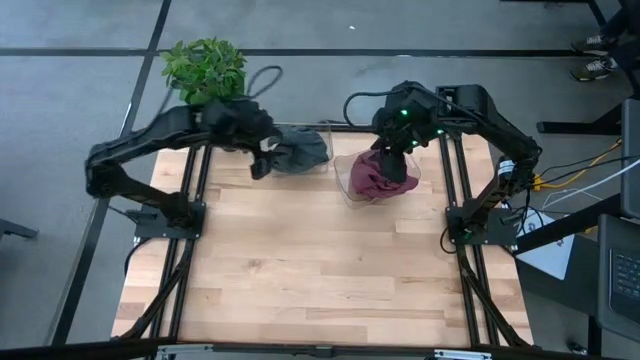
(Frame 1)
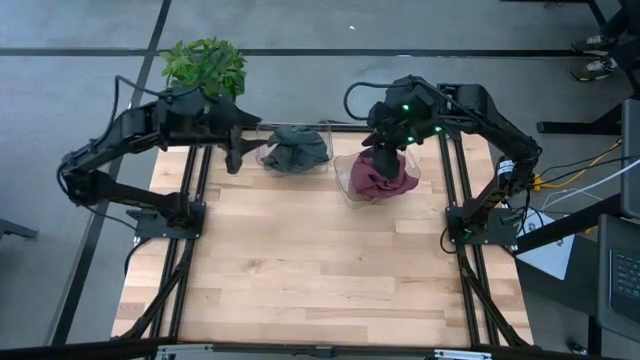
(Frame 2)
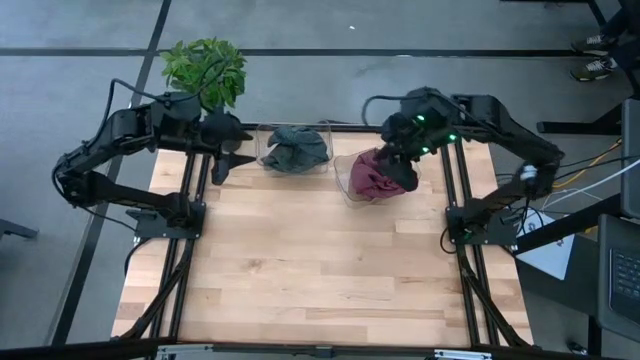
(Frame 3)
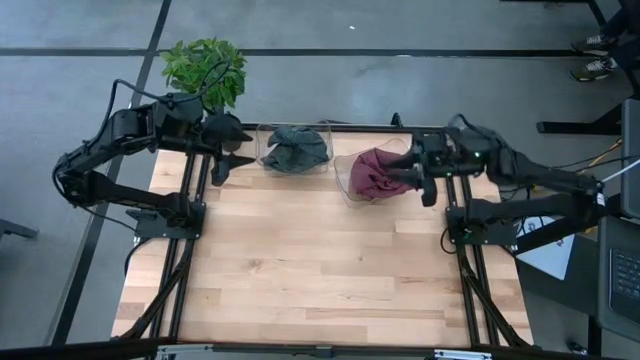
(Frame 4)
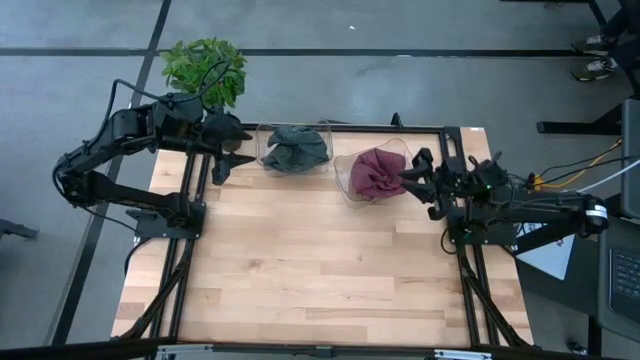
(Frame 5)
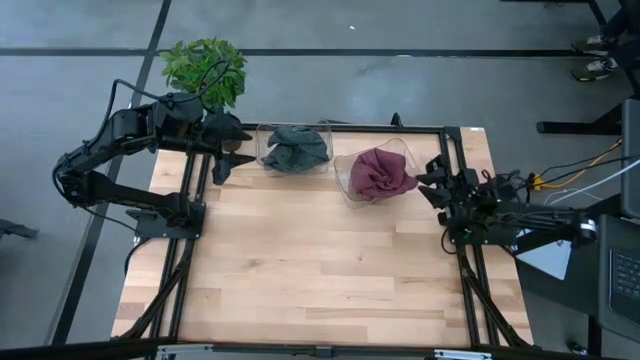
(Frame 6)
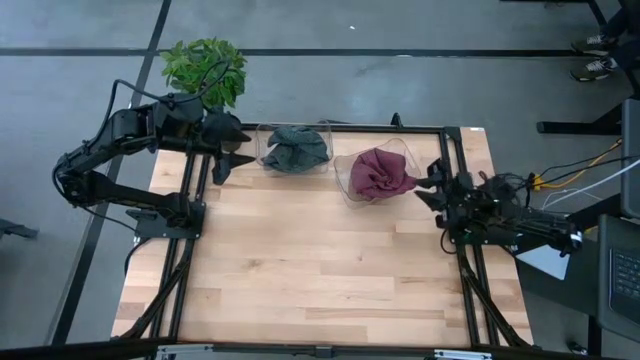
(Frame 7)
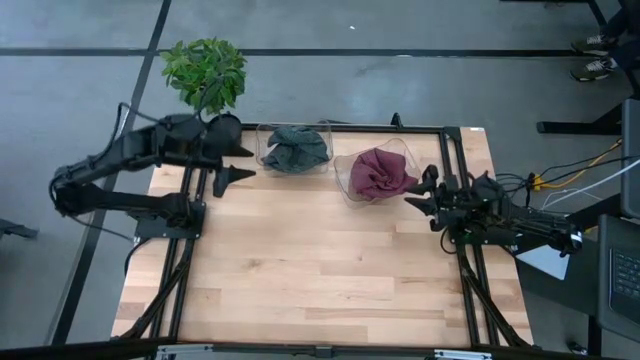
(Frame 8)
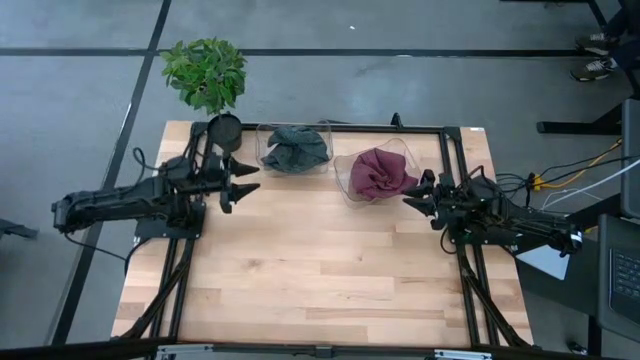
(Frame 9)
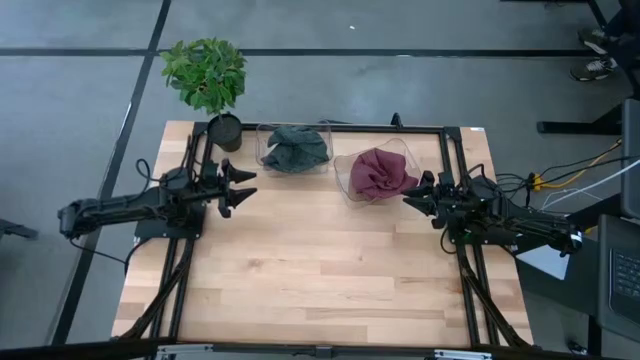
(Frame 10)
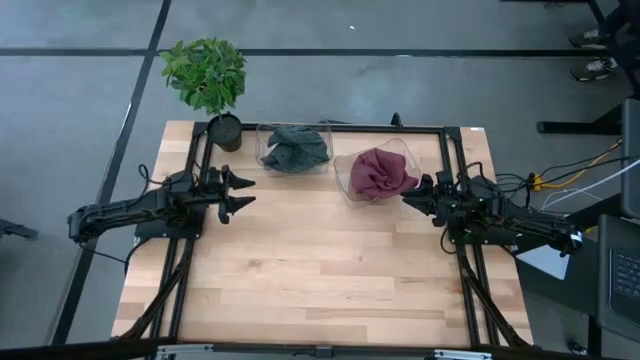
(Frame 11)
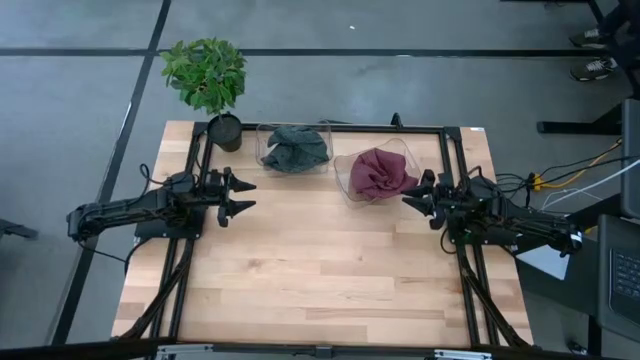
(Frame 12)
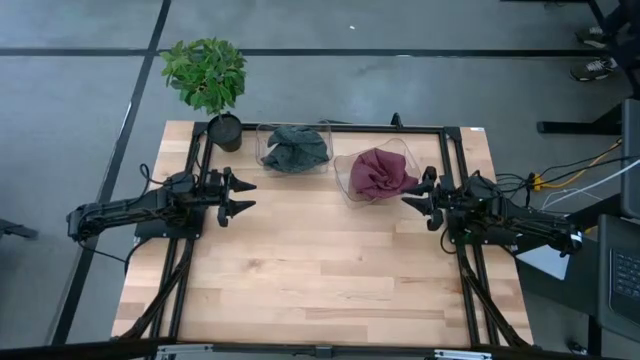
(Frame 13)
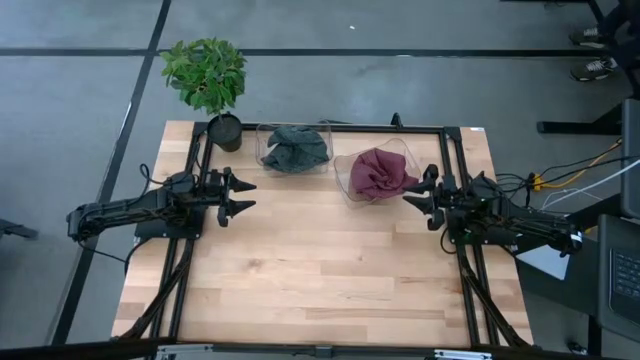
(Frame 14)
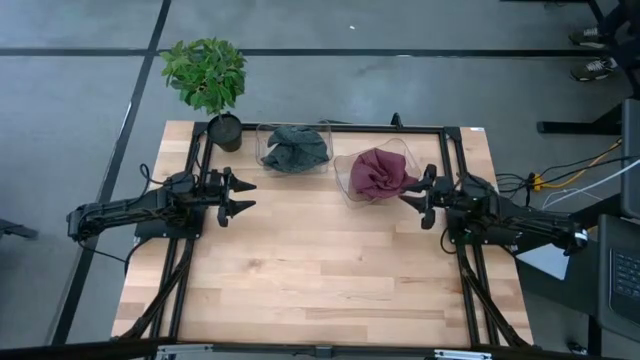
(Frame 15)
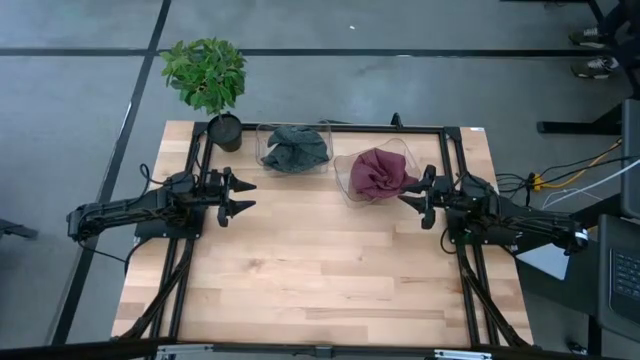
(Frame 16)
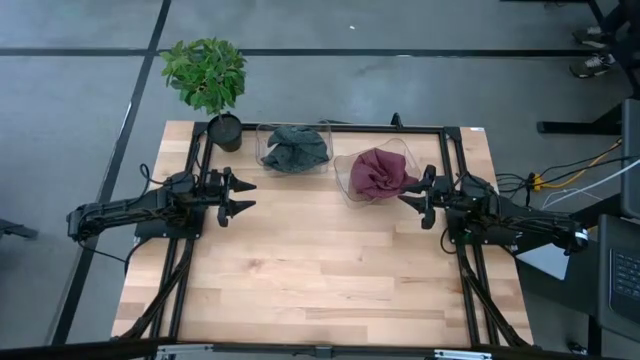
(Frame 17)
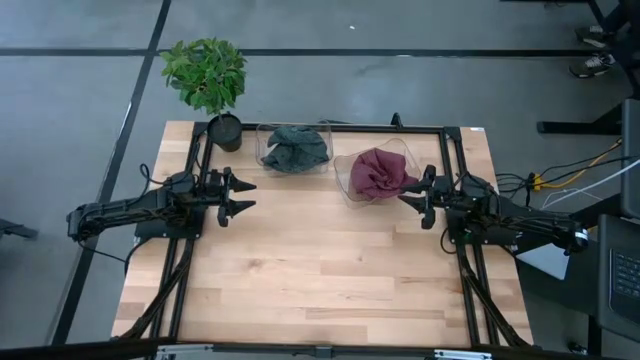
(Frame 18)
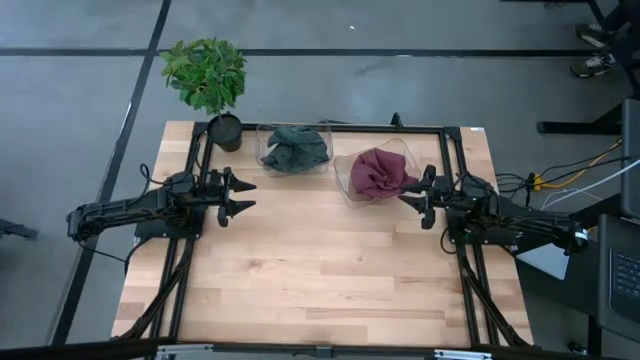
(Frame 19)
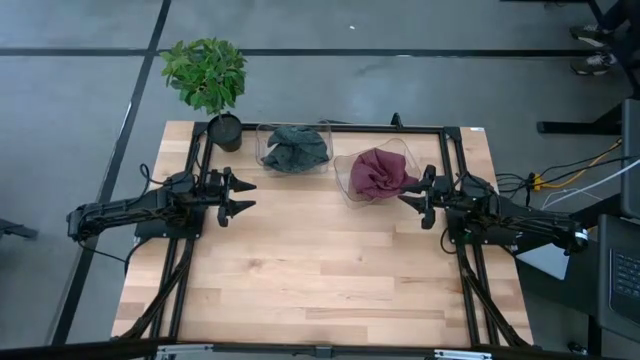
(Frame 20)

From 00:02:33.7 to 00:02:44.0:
Task: Pick & Place hat
Return to Home Position

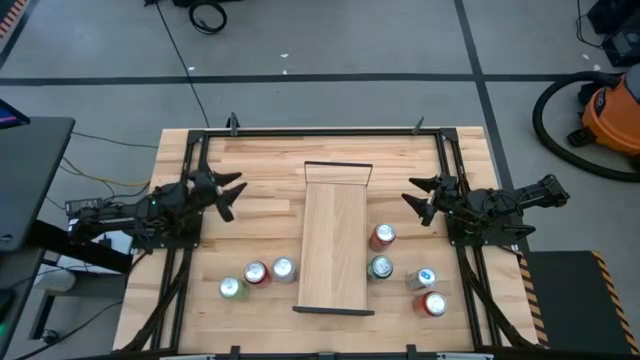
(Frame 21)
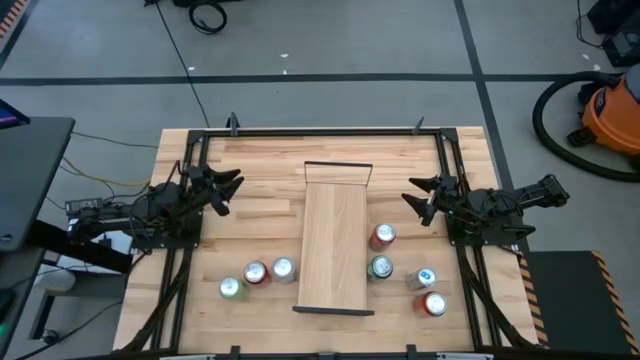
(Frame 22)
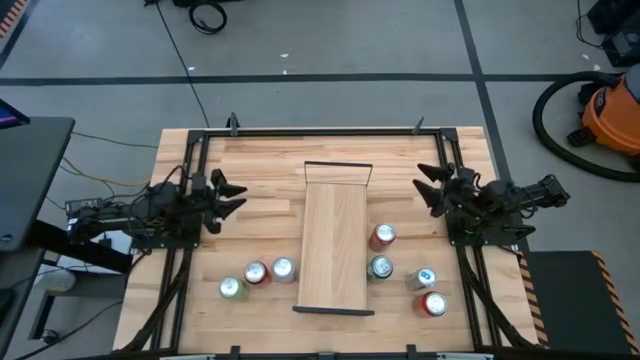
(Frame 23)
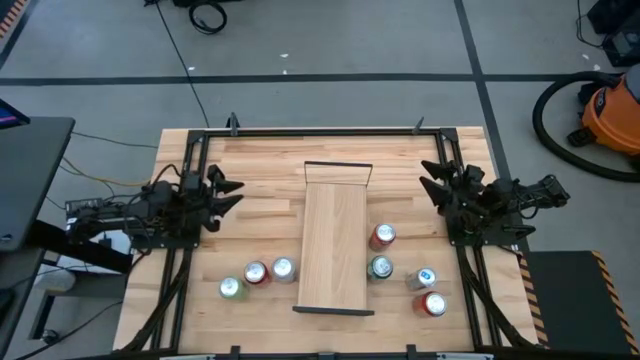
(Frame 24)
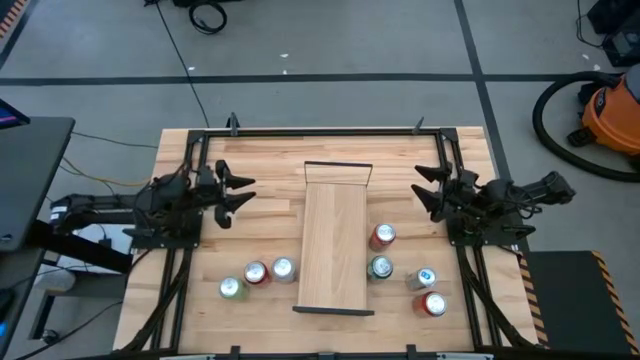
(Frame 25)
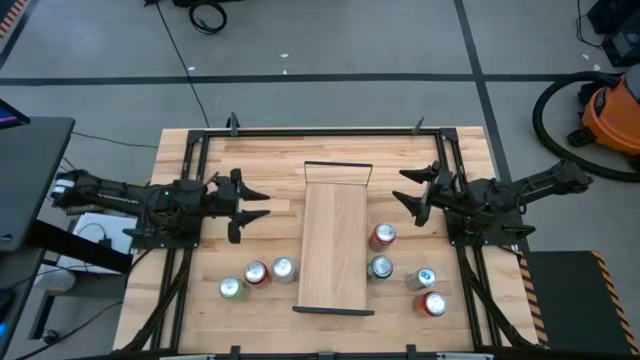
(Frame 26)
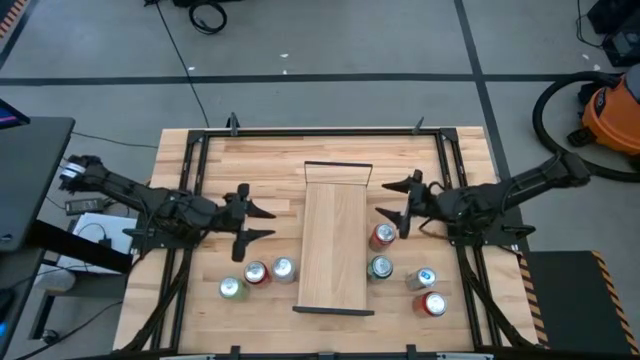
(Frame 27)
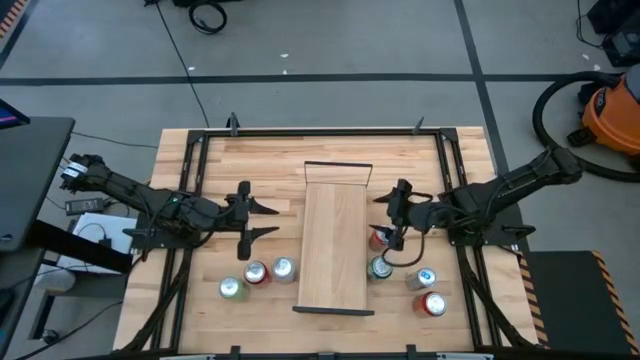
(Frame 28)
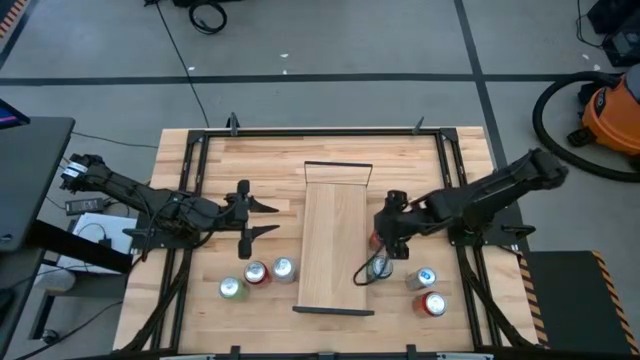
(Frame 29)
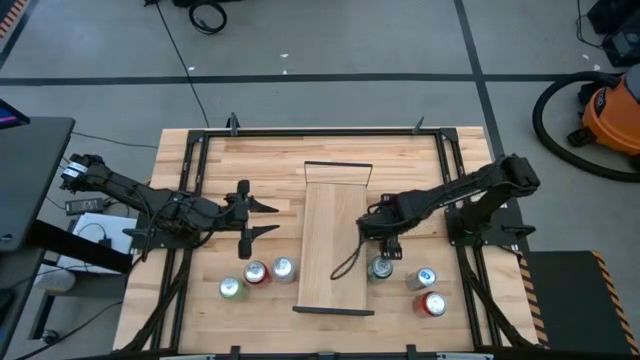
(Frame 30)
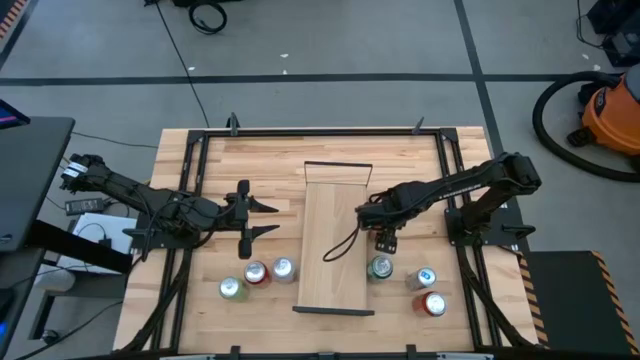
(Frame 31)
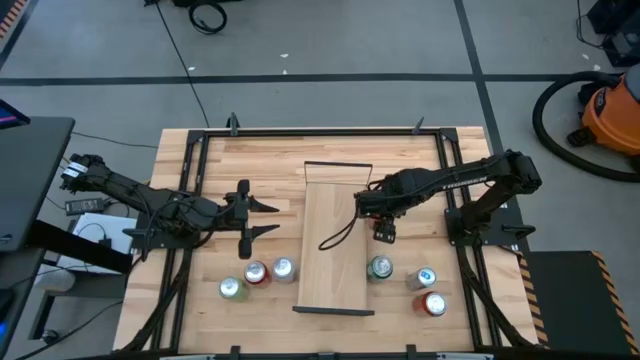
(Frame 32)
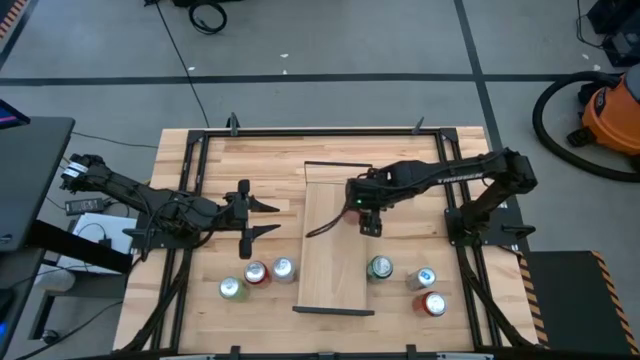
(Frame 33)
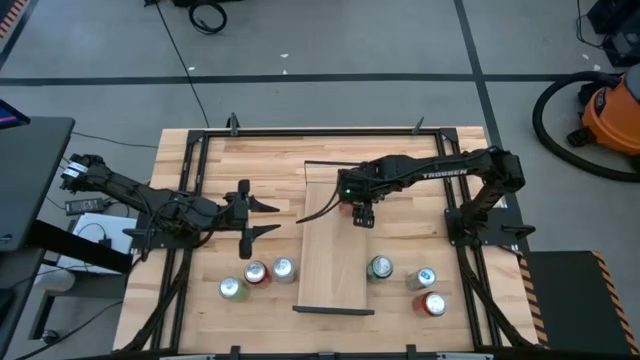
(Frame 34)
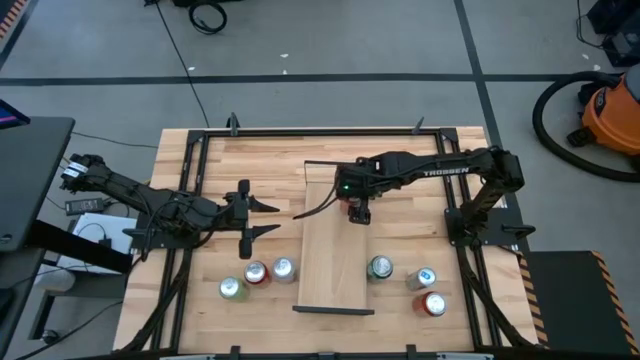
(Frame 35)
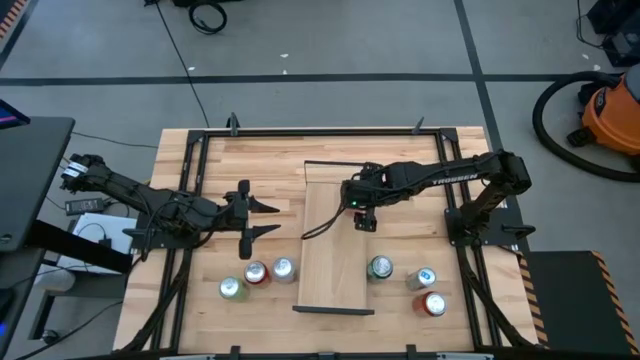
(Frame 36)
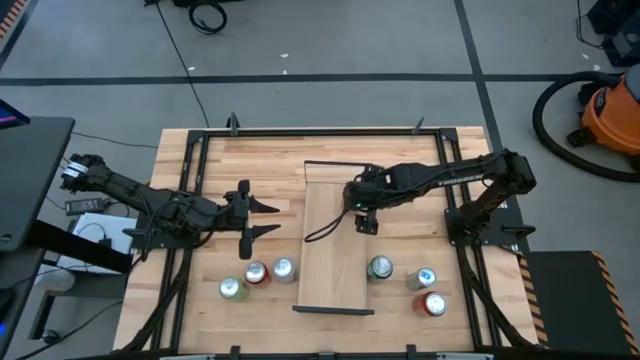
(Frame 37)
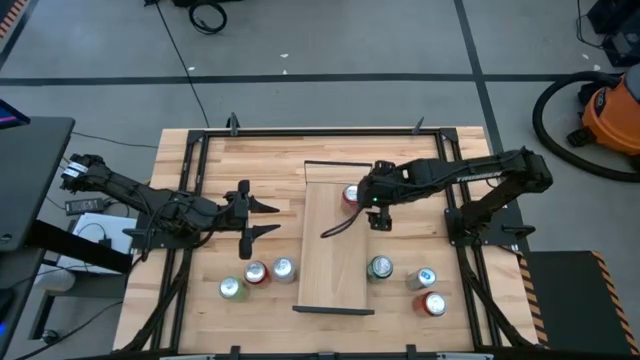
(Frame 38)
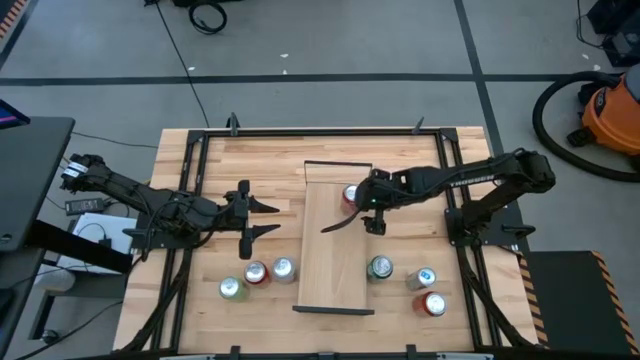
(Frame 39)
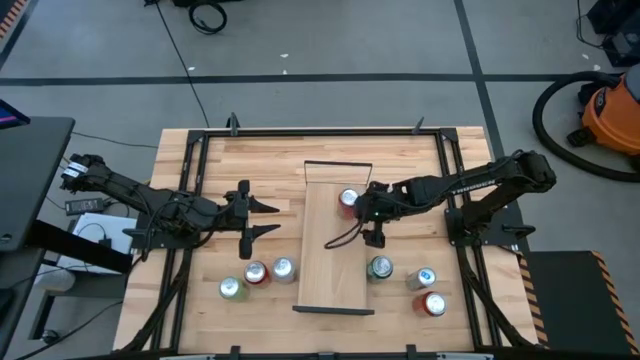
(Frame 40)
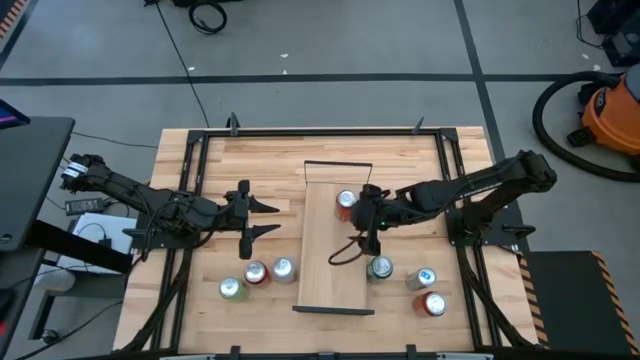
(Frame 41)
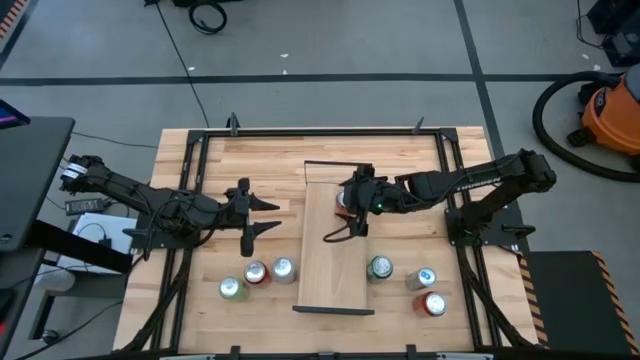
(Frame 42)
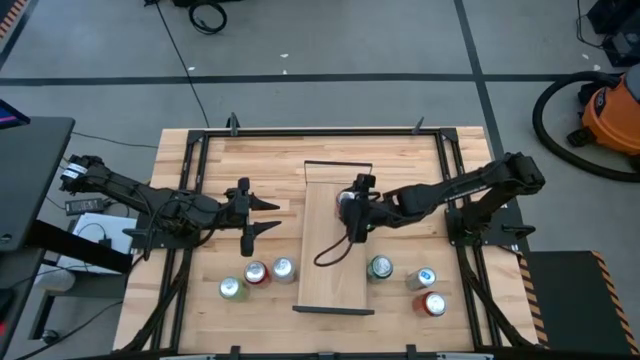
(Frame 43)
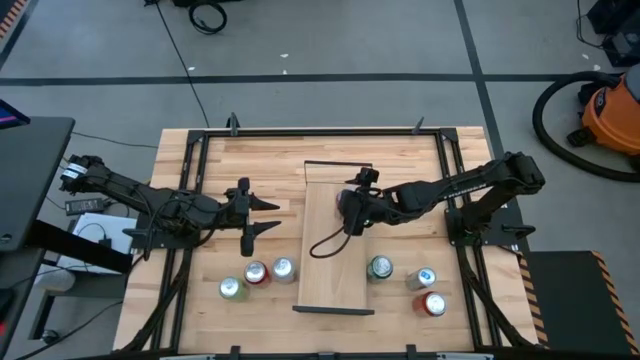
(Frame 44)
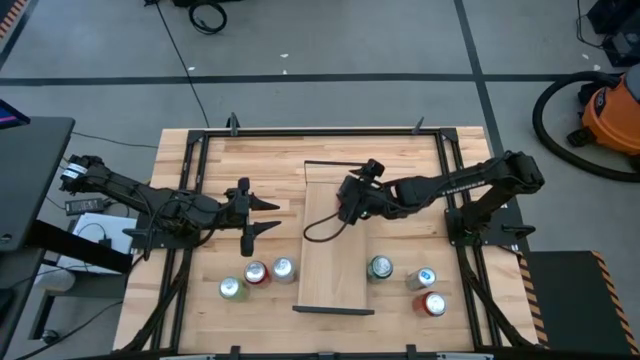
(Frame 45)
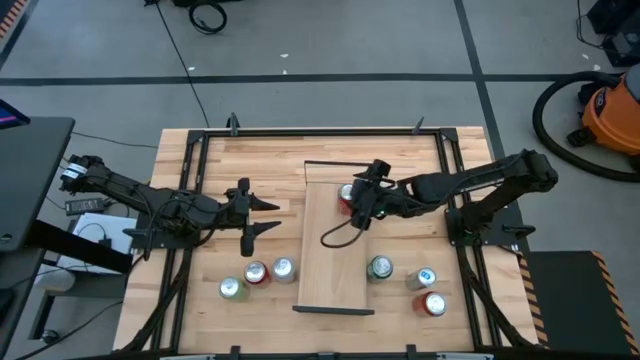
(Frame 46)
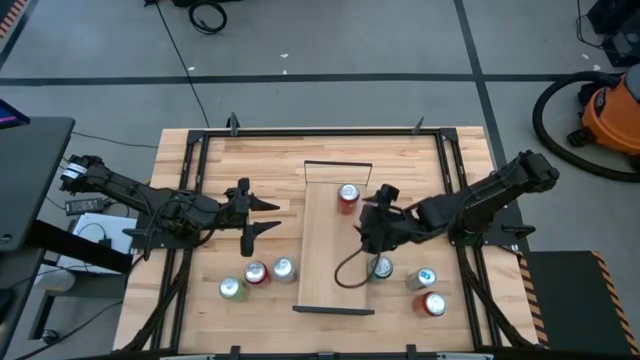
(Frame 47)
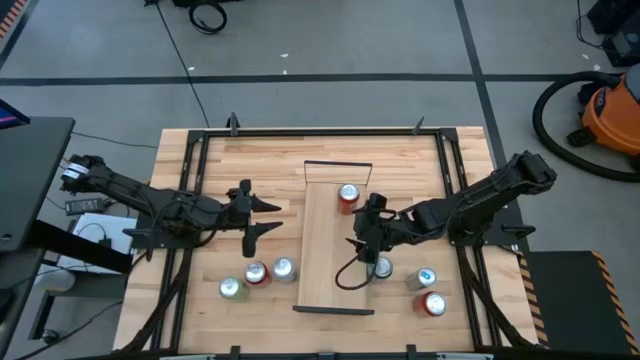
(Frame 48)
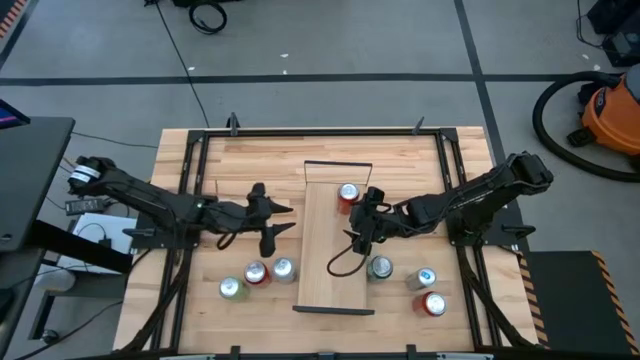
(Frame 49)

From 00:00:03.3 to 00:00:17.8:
Task: Place canned beverage on shelf
Put the top red soda can on the shelf
